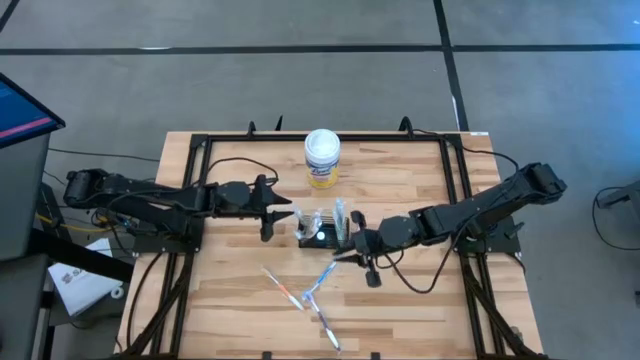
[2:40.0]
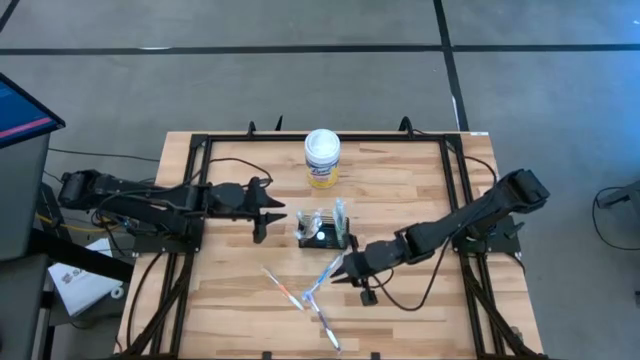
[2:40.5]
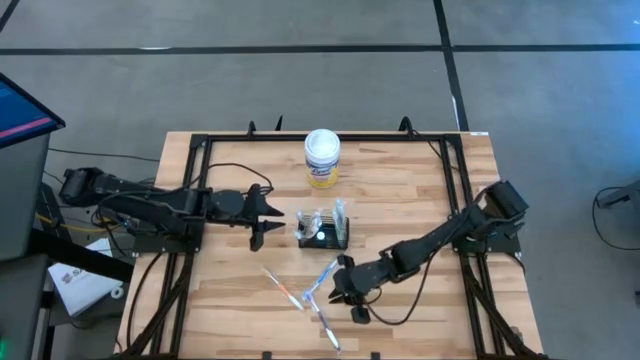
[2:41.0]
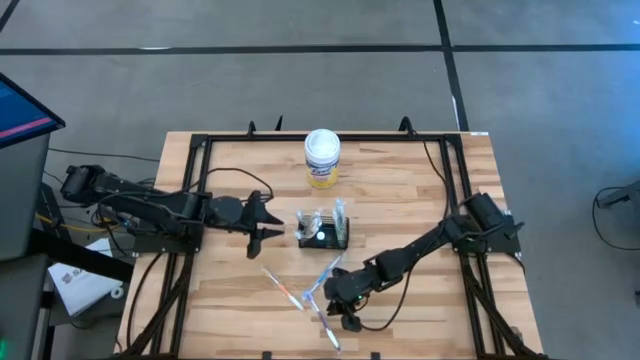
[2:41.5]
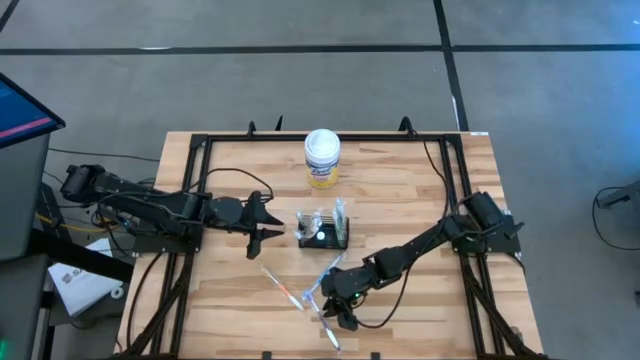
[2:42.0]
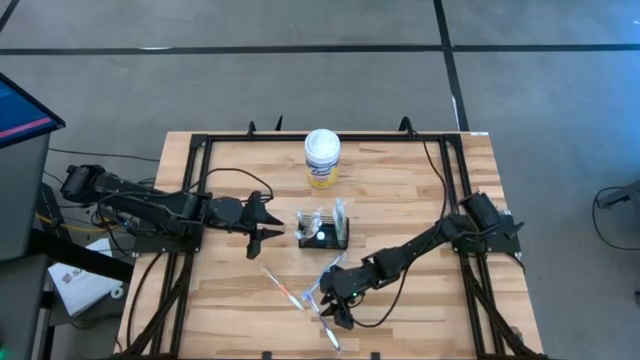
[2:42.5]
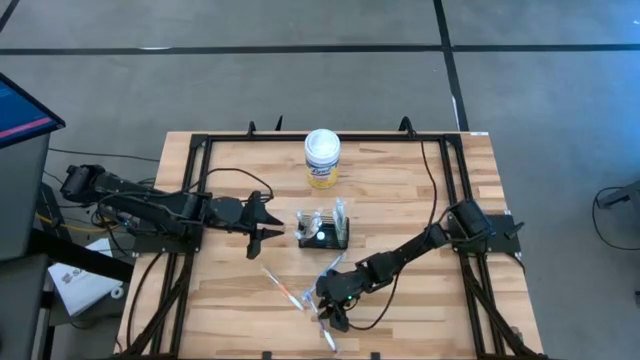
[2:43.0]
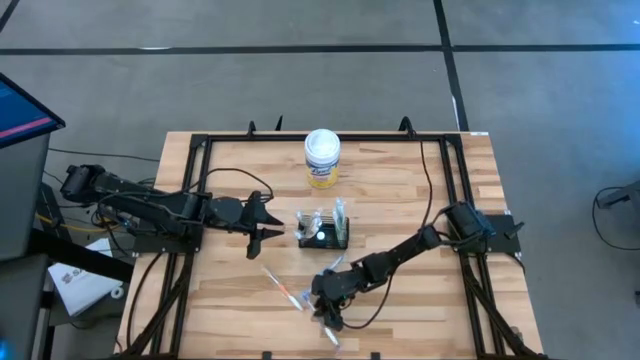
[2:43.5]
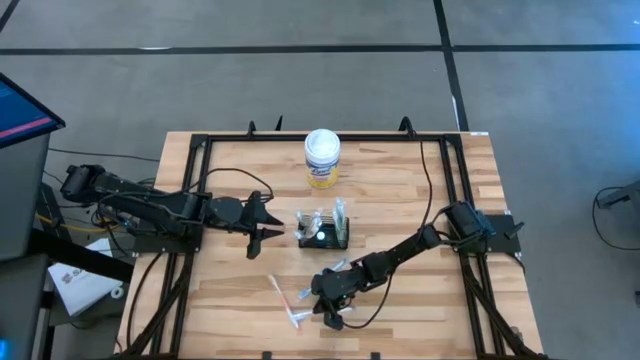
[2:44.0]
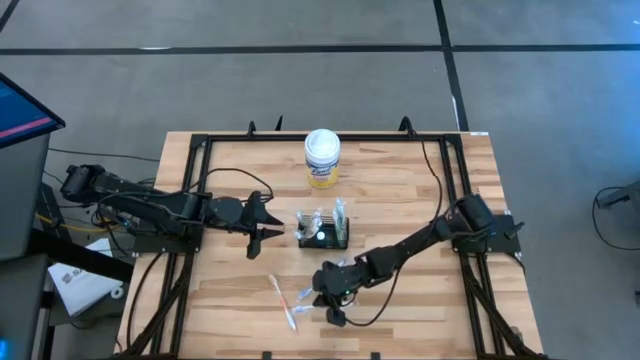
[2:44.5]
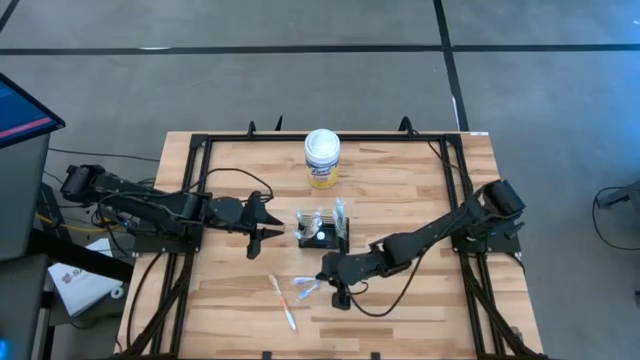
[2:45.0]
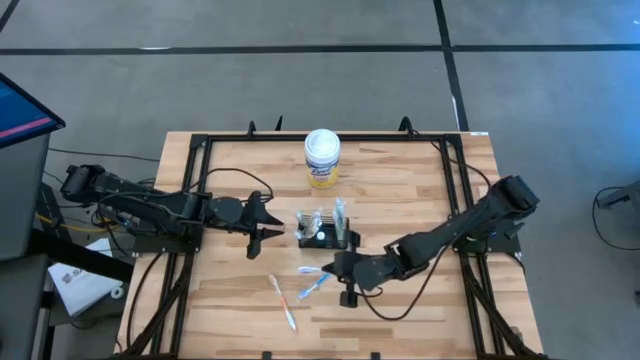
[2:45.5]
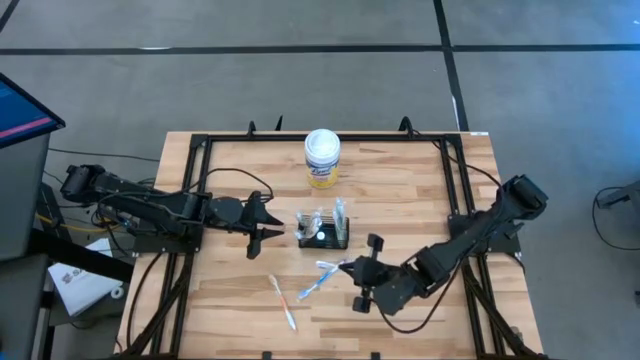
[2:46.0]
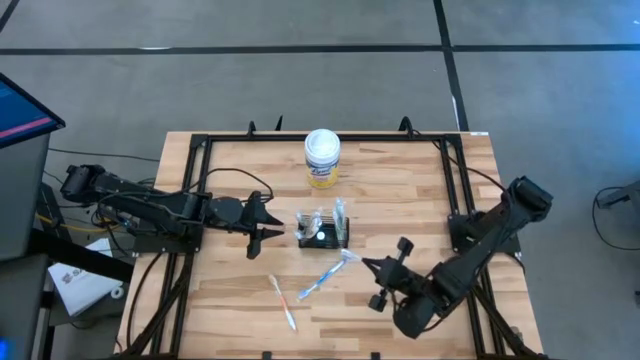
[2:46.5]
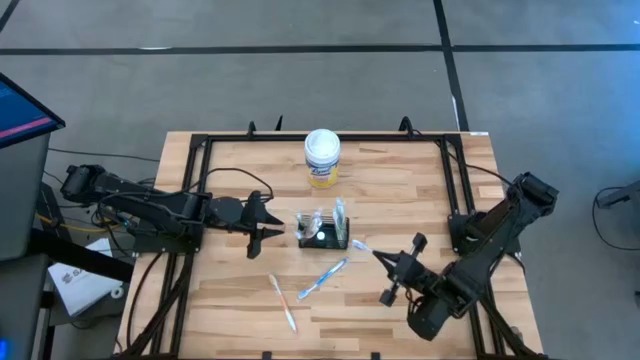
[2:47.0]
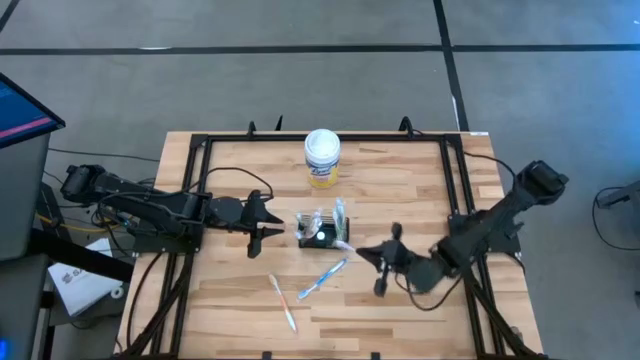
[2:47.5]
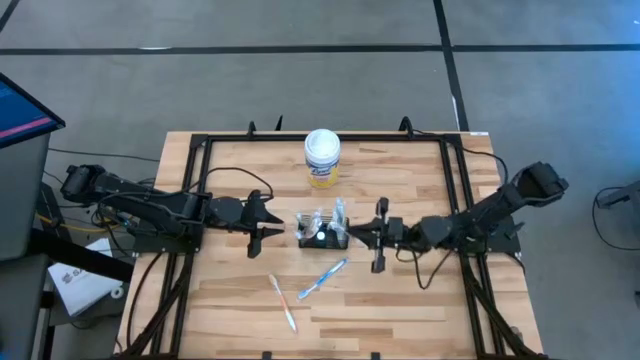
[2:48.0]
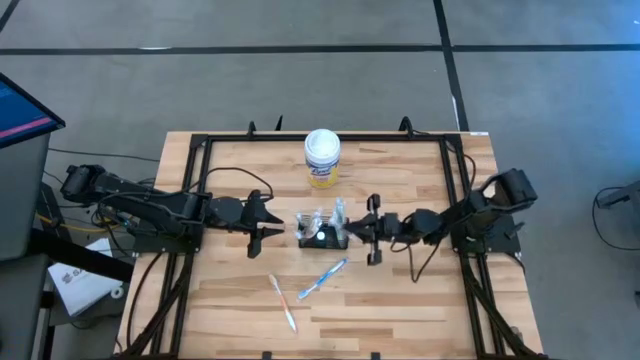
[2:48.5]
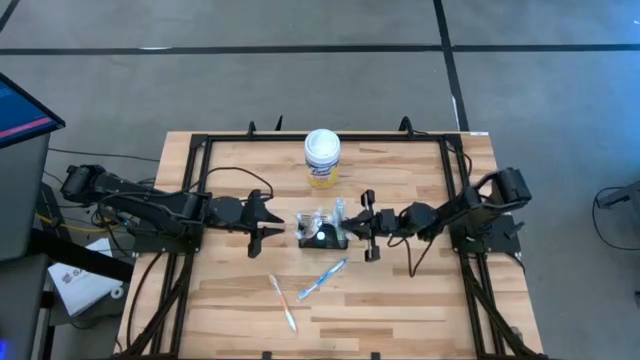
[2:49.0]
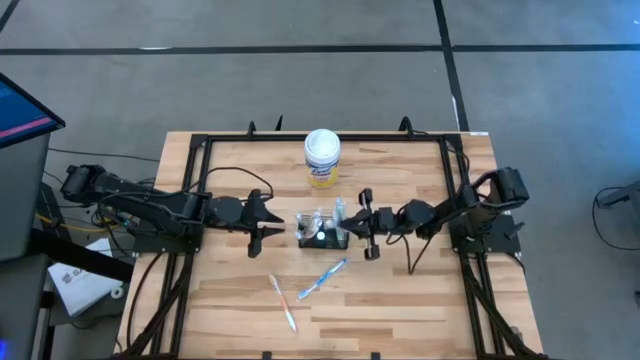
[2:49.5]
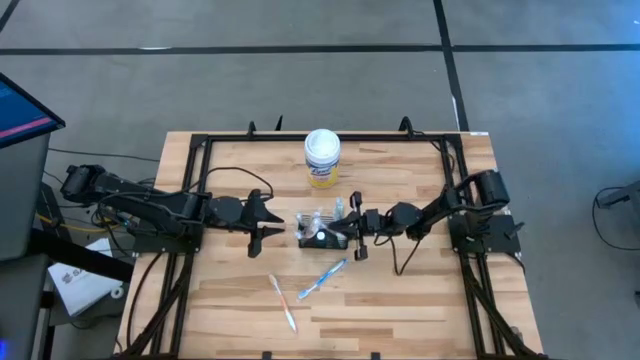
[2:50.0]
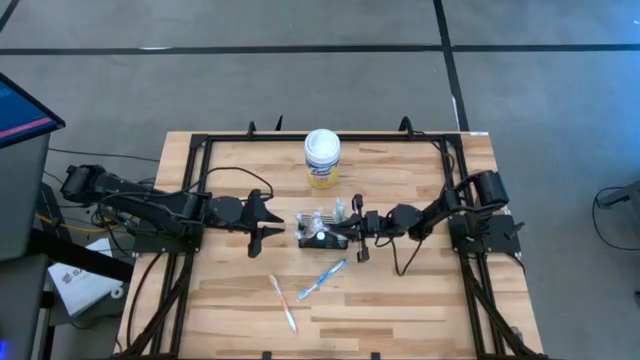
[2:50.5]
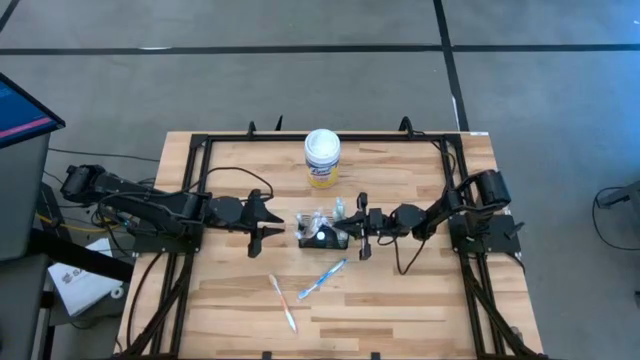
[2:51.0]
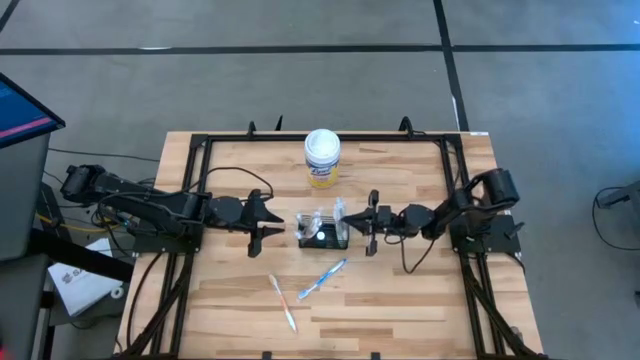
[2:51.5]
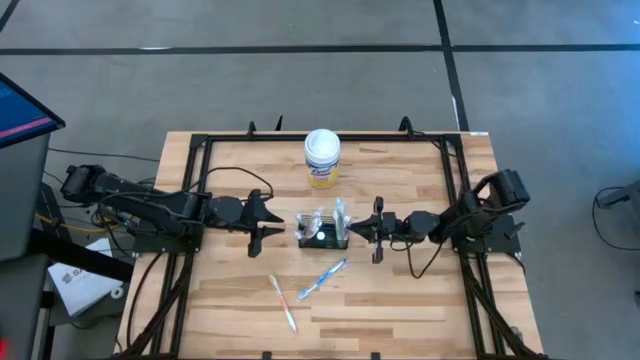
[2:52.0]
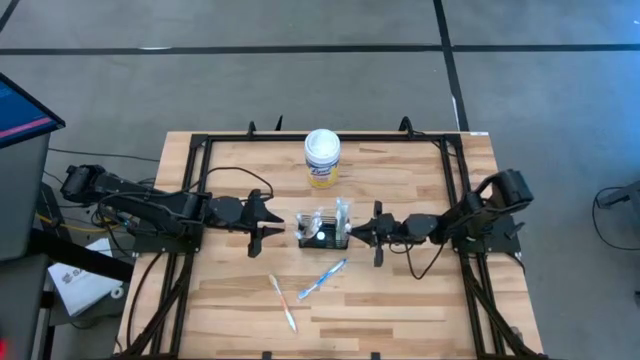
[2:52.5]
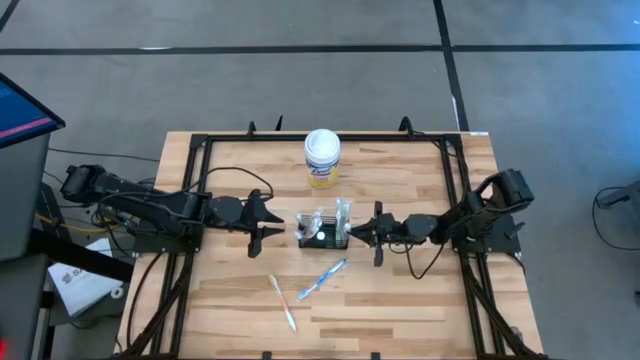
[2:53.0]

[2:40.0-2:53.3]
Task: Pick & Place toothbrushing station
Put the violet toothbrush into the black mesh organizer

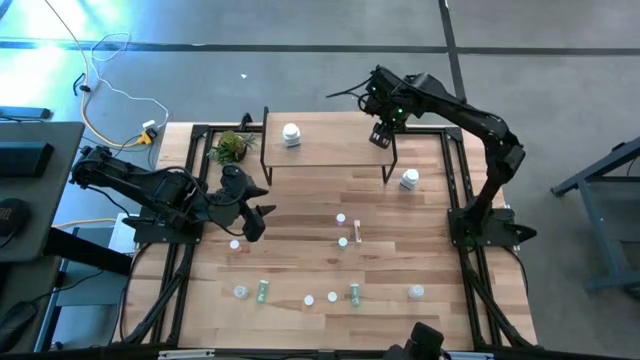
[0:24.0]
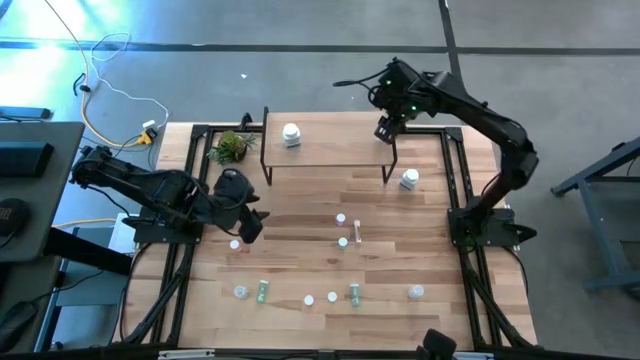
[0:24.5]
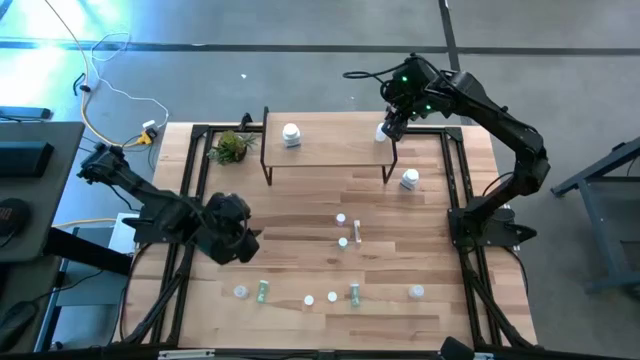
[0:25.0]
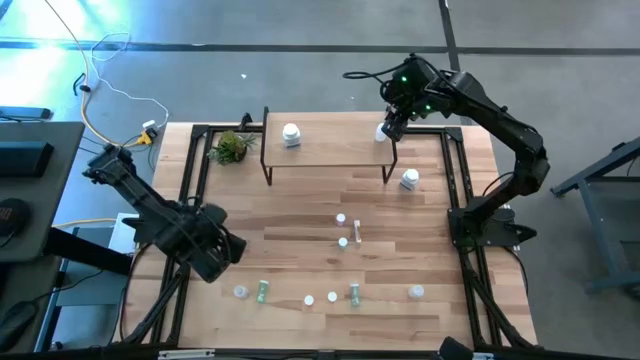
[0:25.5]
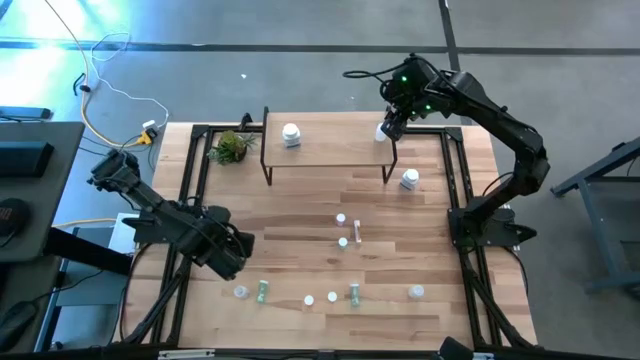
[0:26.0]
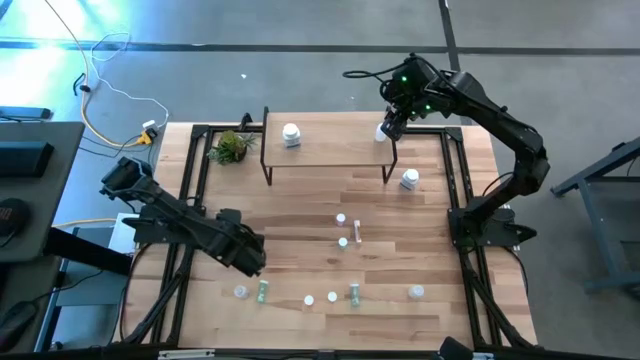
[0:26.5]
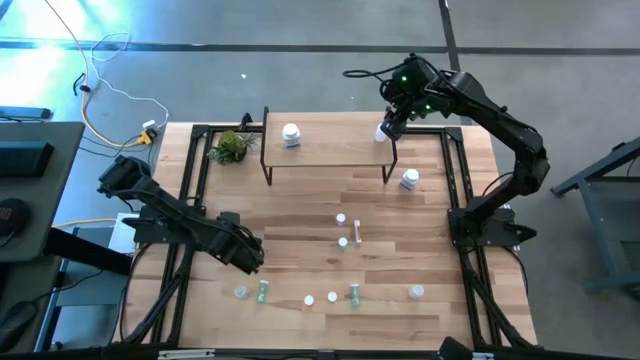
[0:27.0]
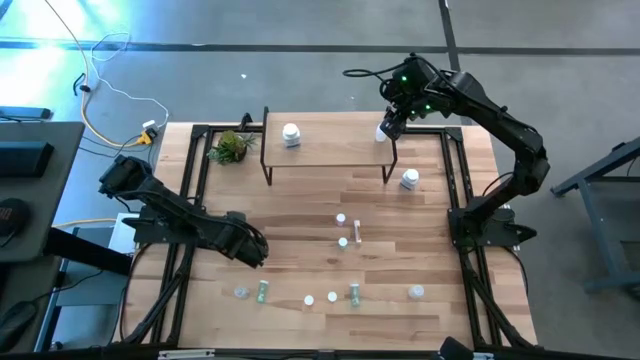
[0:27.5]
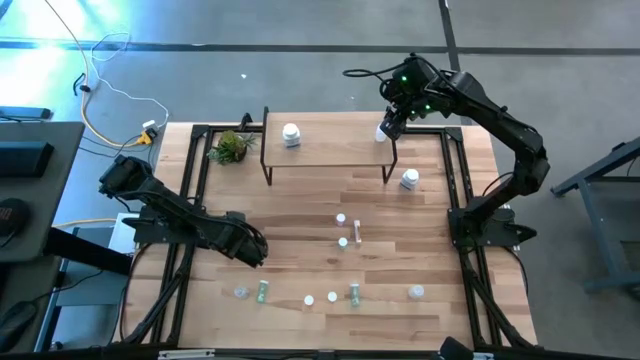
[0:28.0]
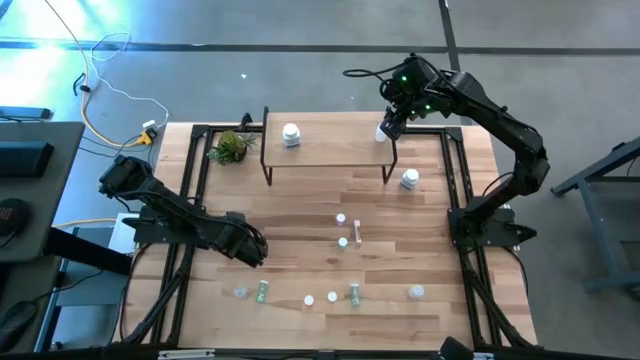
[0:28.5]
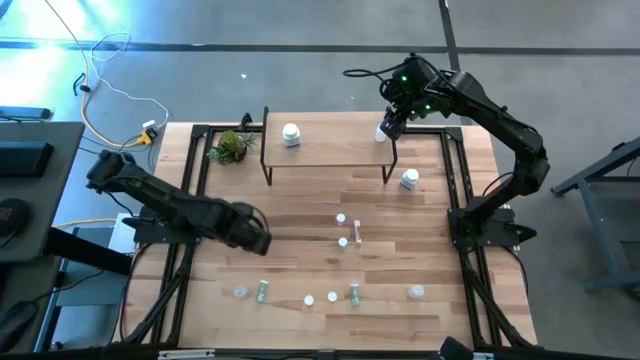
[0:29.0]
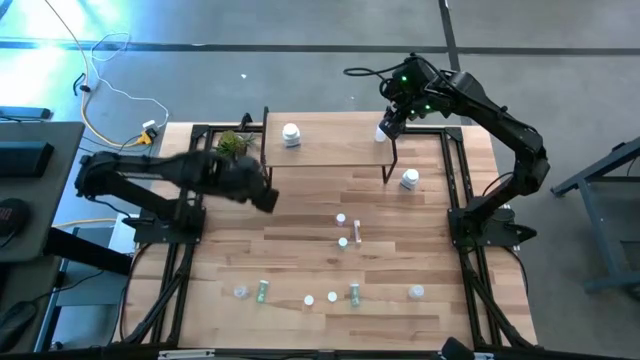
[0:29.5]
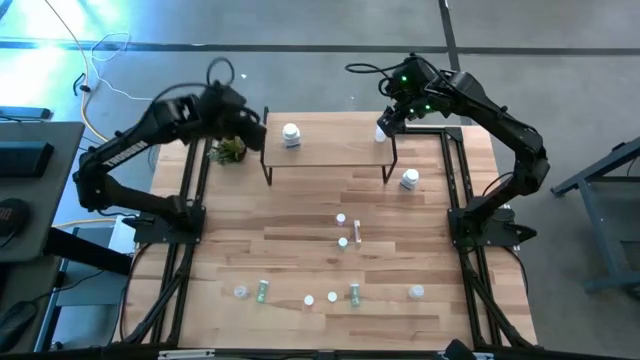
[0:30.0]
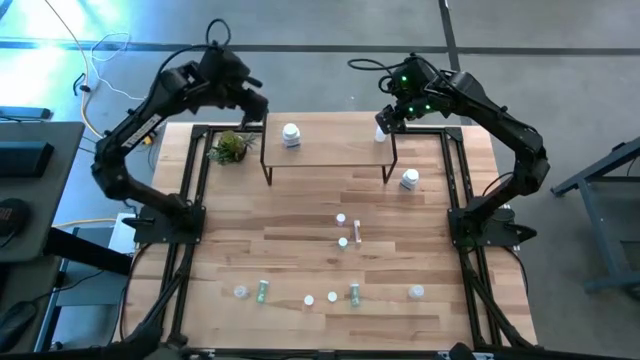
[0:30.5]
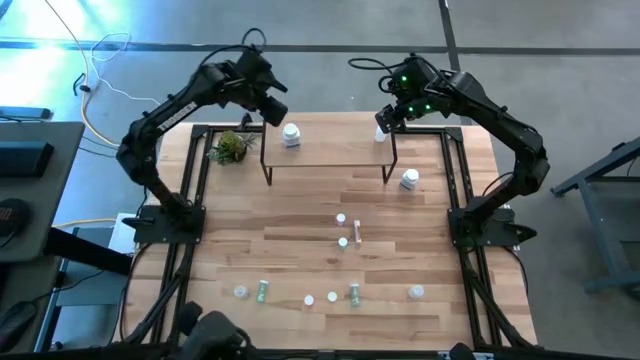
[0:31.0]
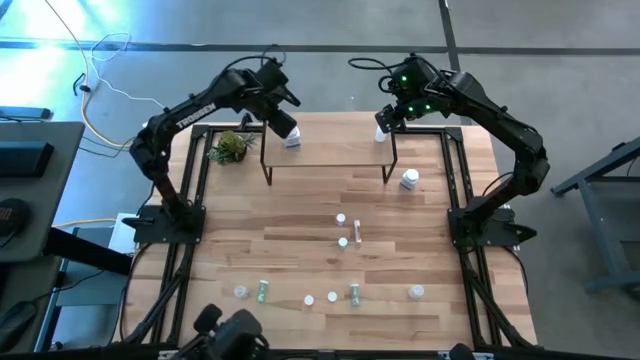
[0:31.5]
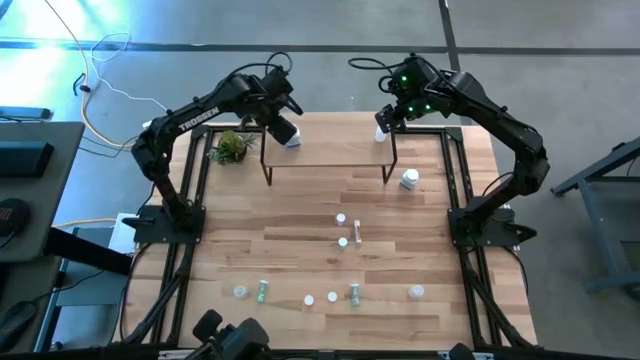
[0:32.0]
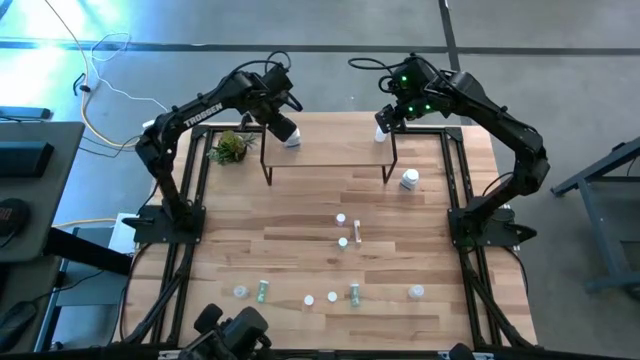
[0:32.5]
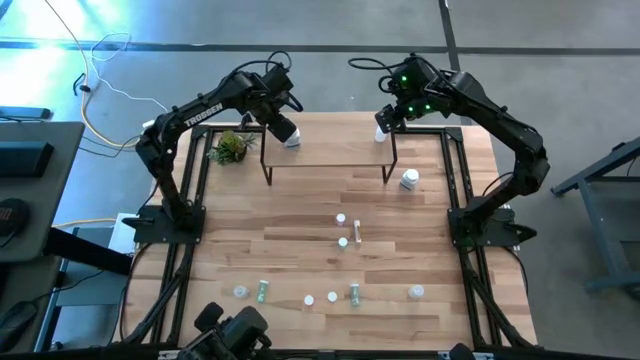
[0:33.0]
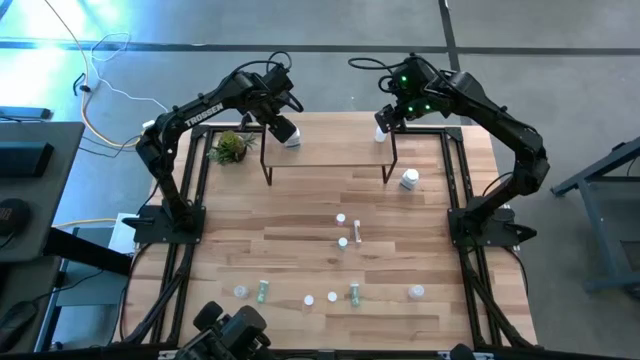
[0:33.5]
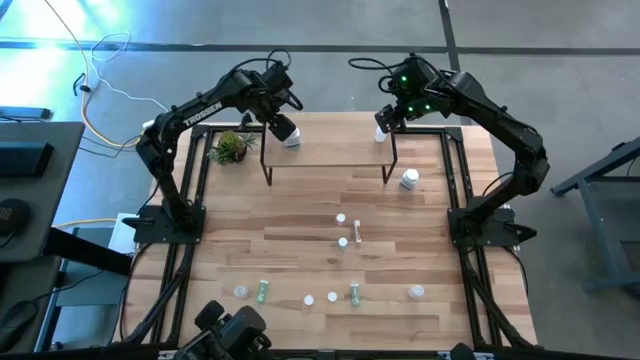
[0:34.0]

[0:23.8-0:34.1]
Task: Pick and place medicine bottles onto shelf by color
Put the bottom orange pill bottle on the shelf
